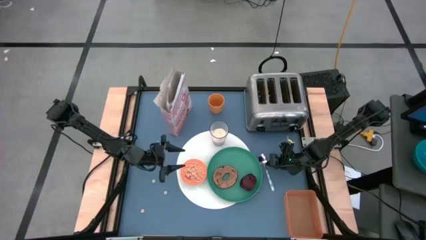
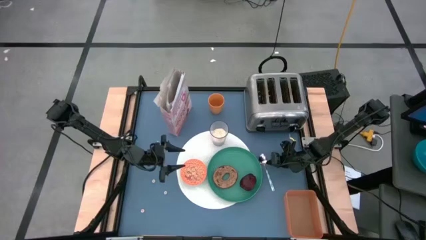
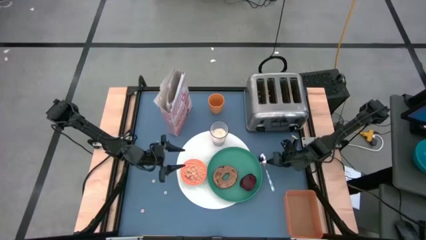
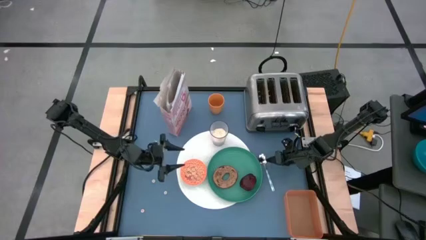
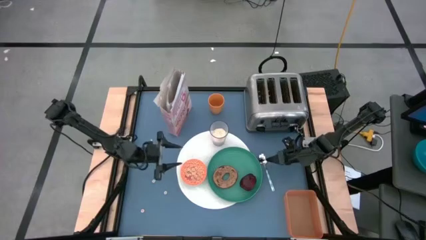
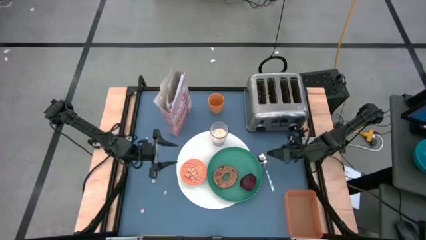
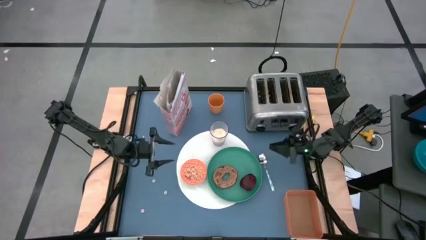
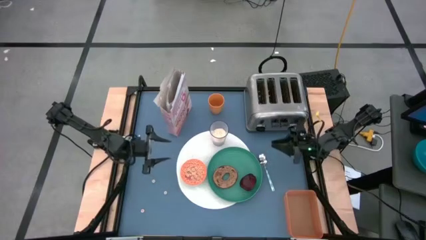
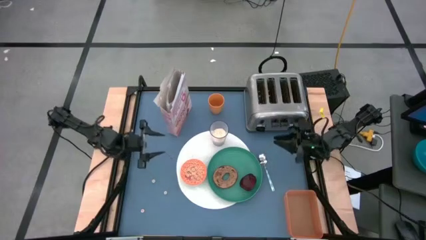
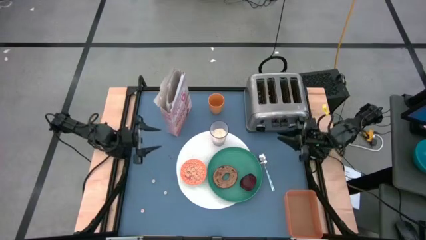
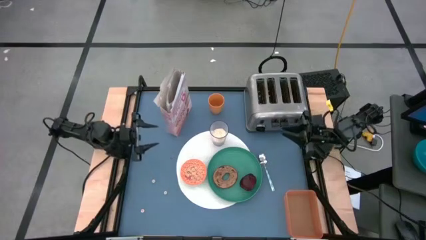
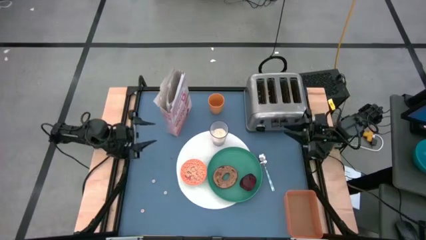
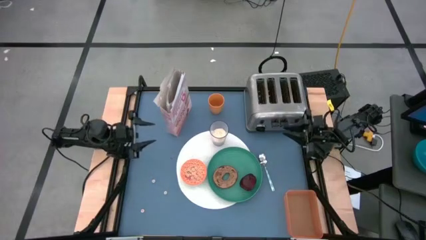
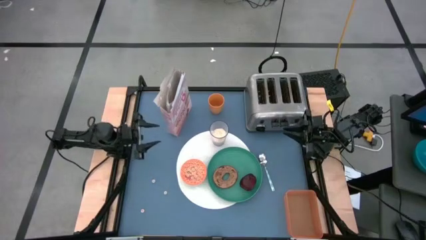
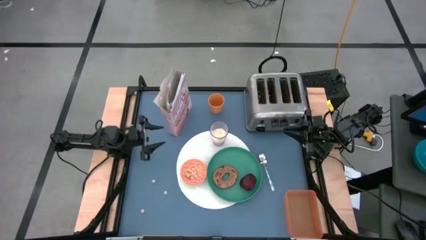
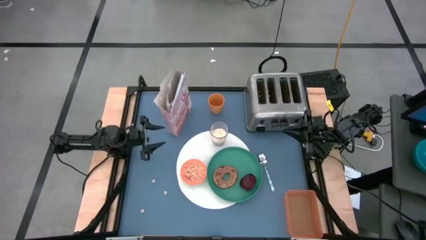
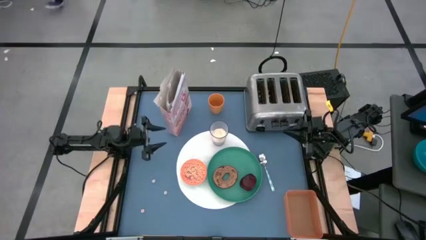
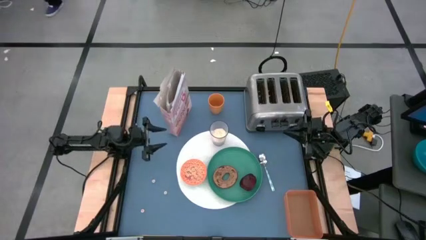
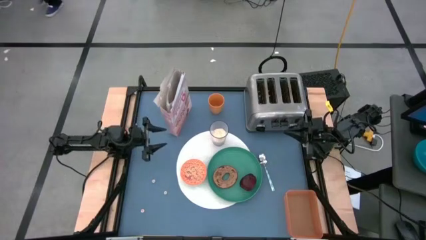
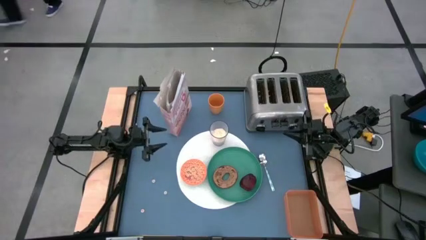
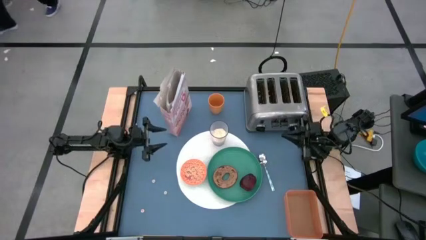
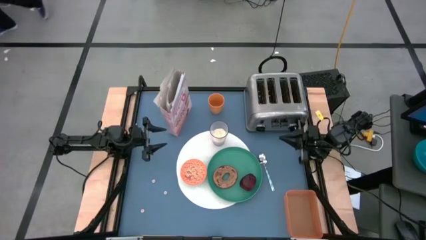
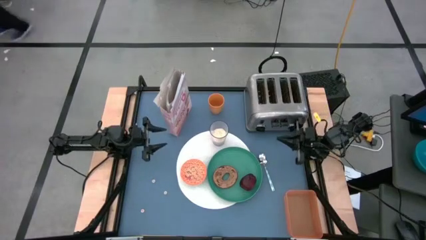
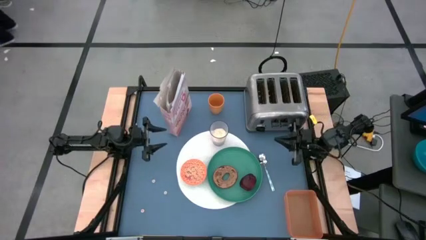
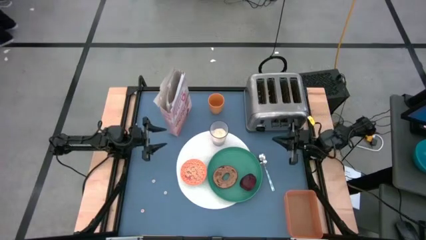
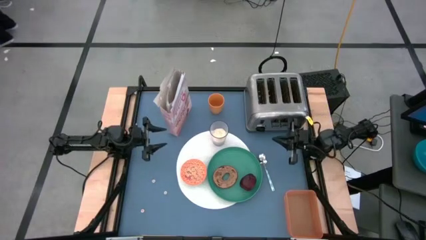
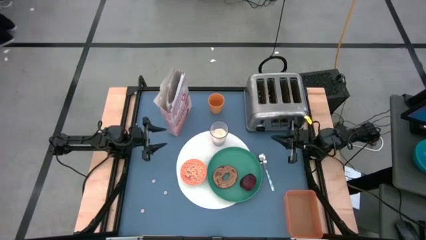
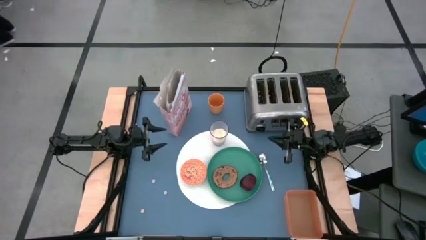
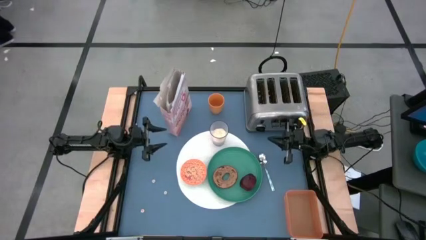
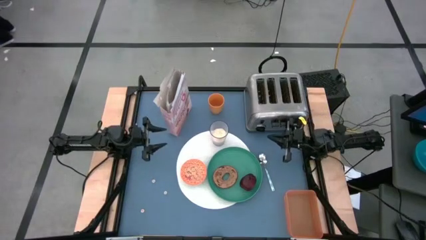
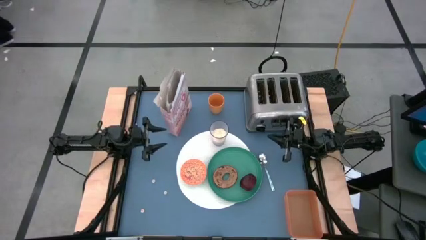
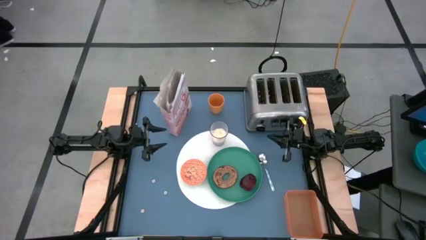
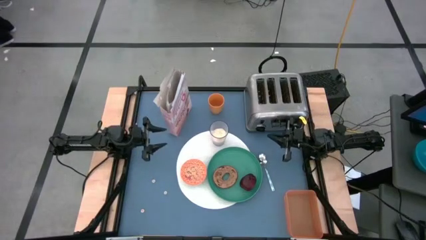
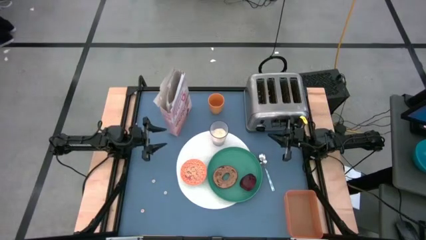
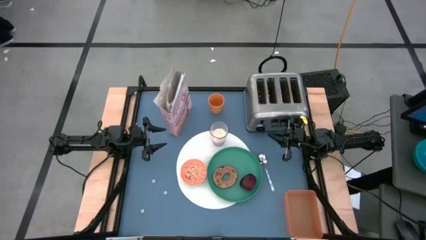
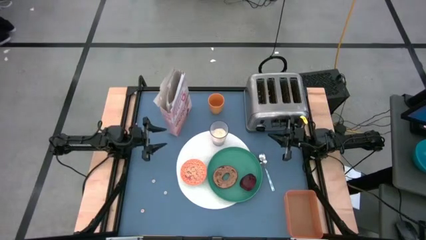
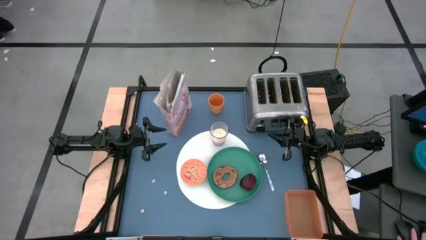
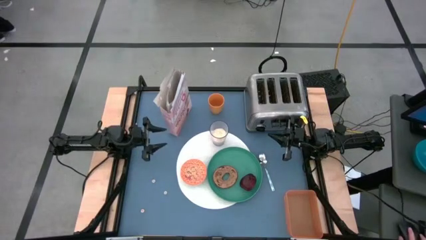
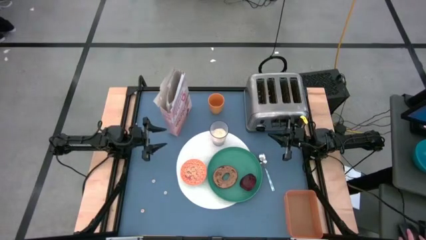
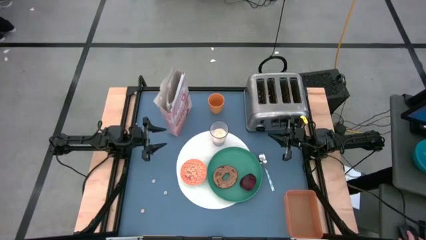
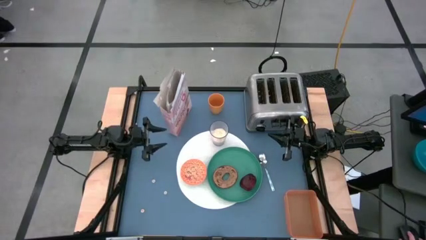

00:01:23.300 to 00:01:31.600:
Task: Arrange a breakfast setting
Return to Home Position

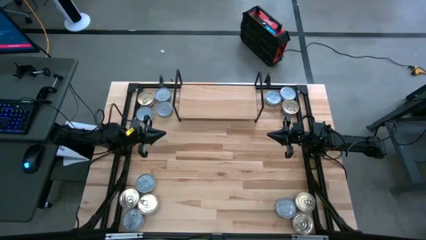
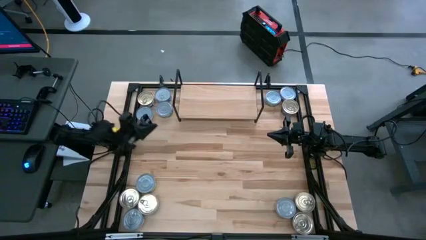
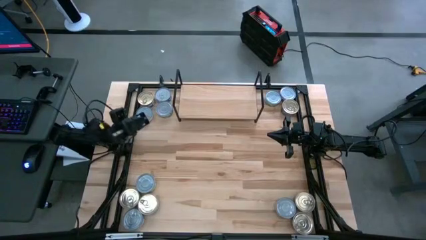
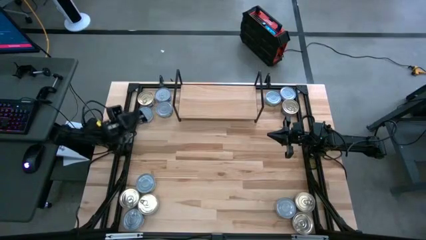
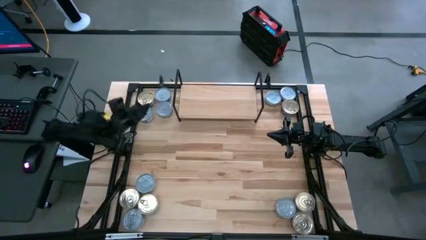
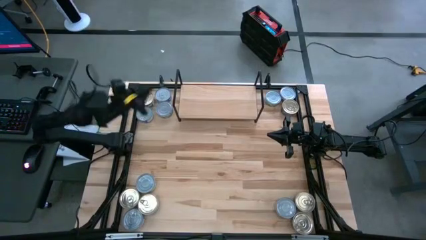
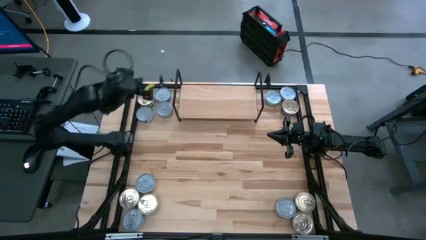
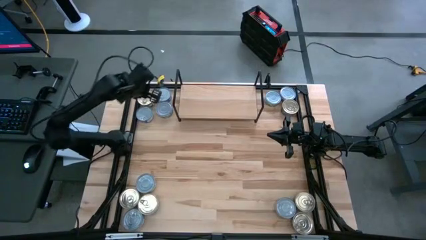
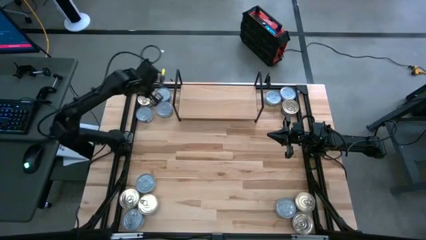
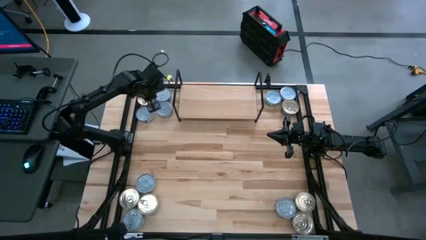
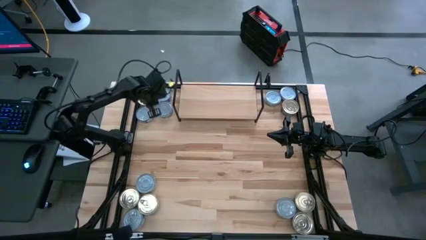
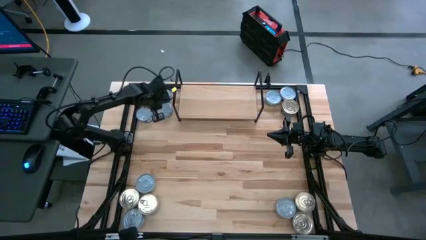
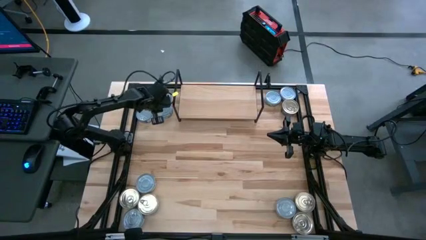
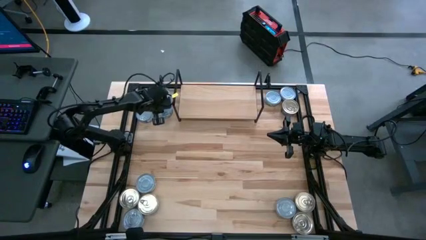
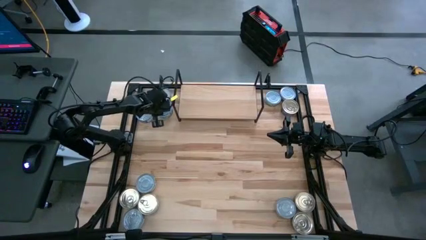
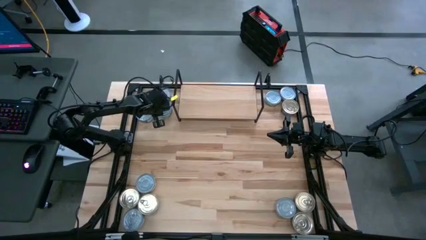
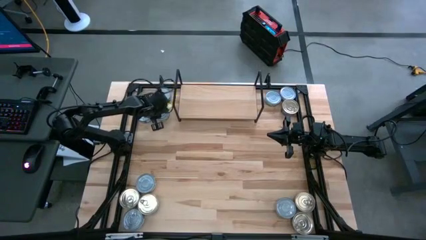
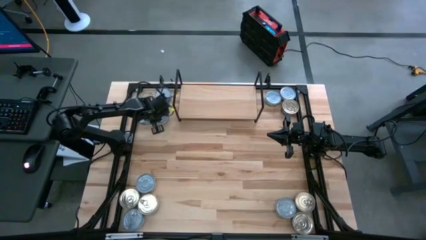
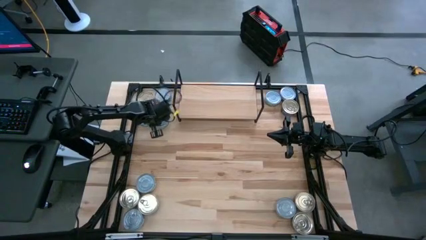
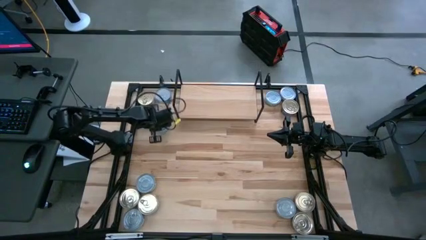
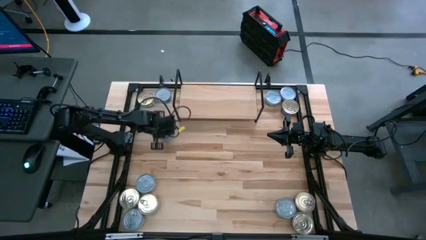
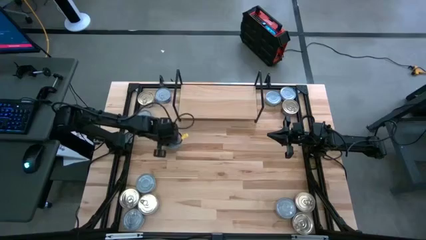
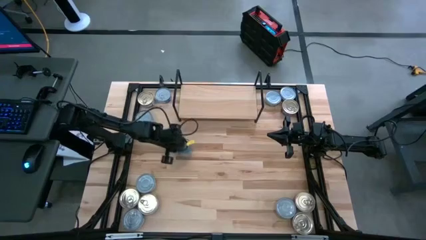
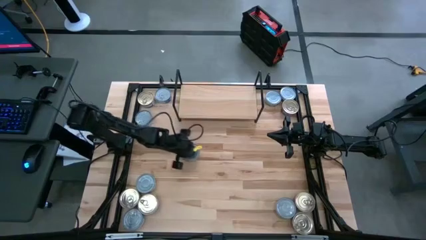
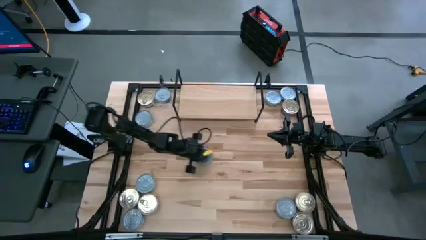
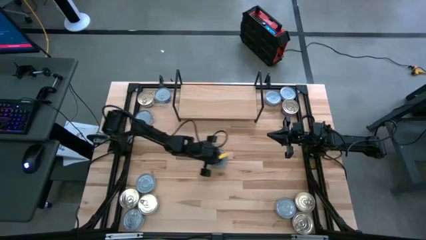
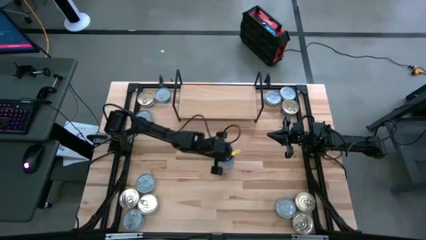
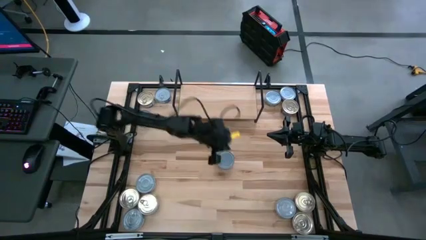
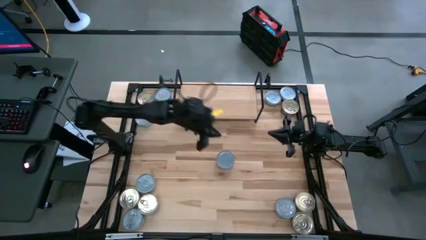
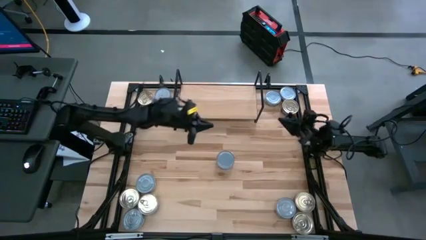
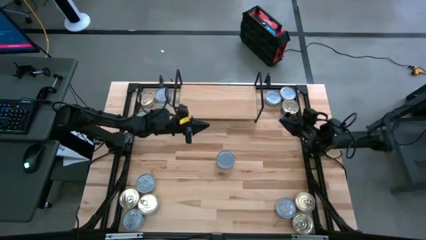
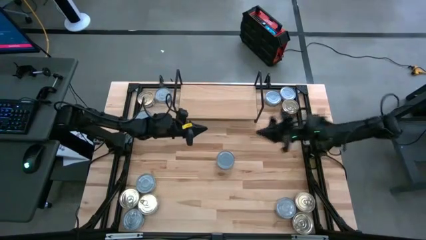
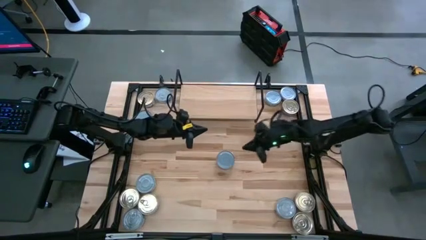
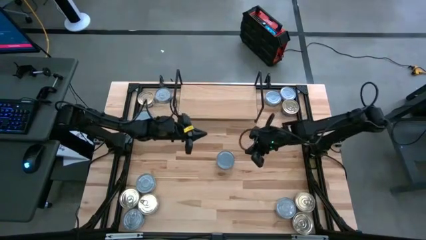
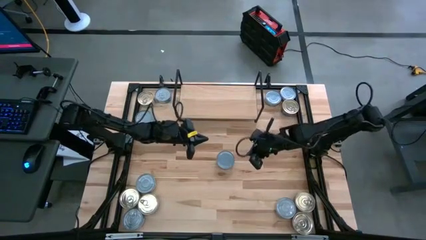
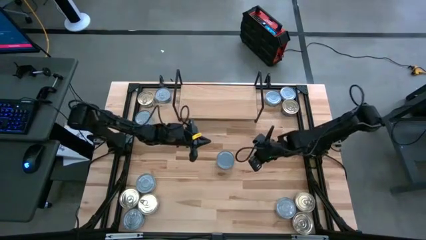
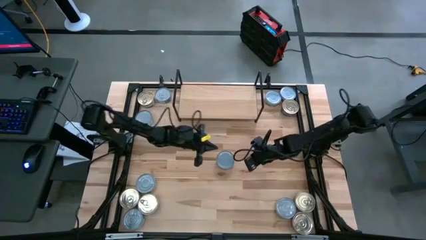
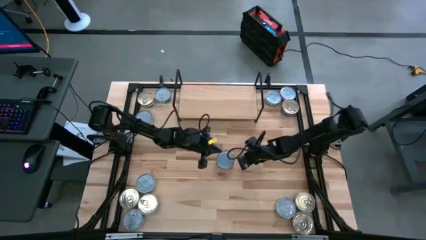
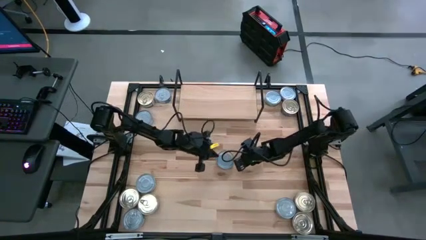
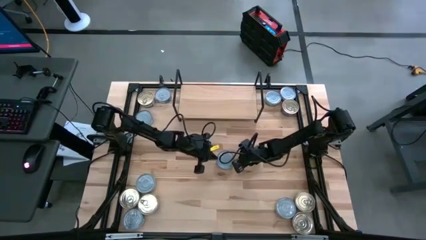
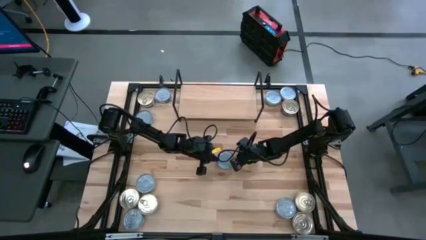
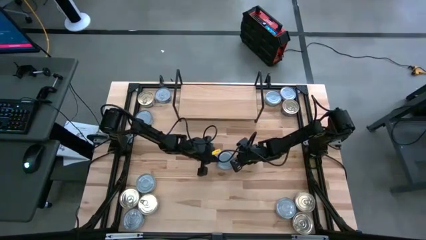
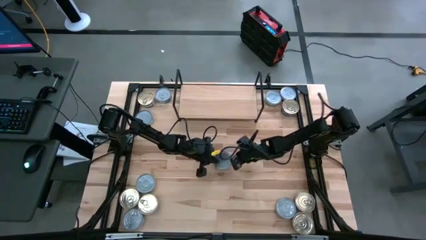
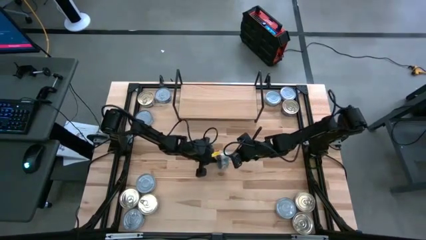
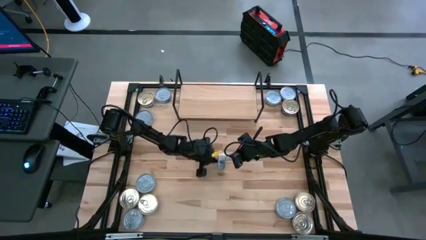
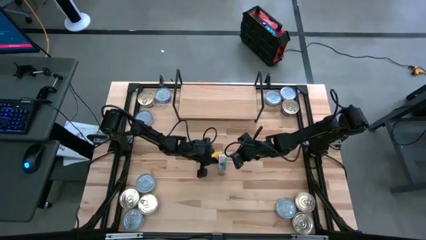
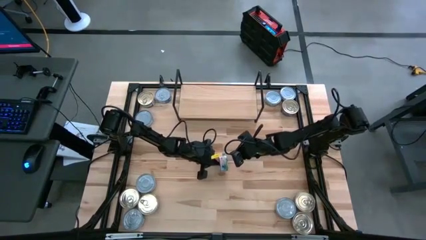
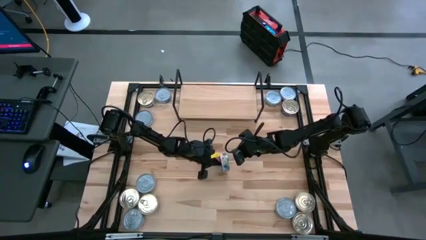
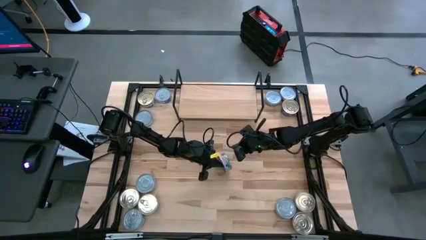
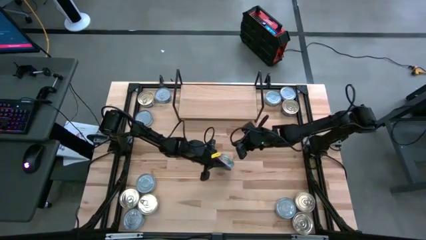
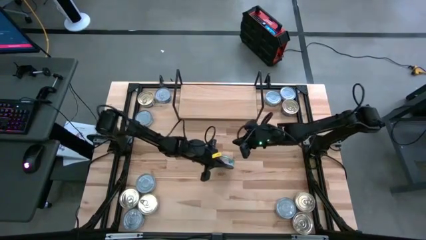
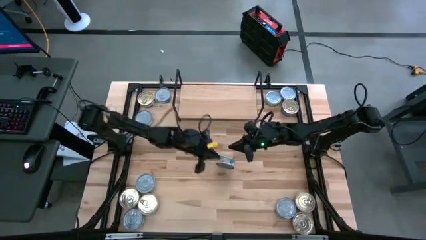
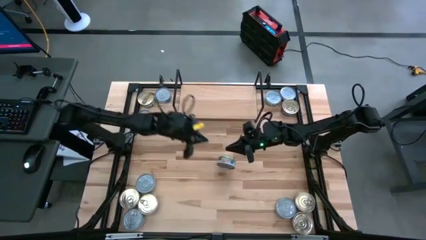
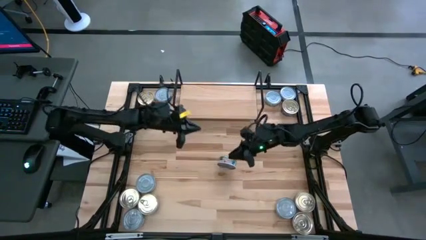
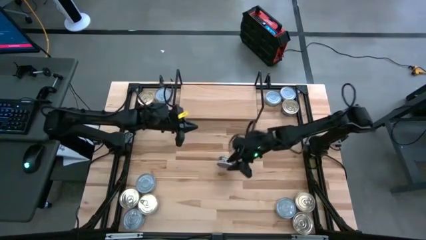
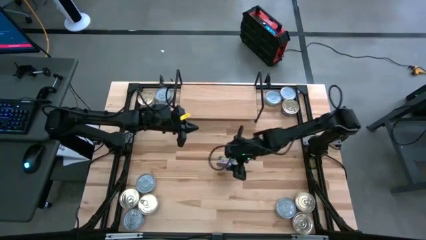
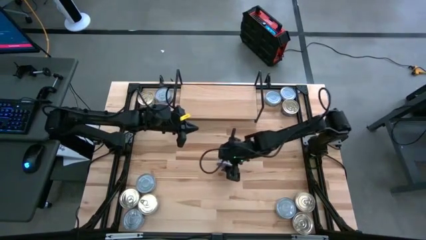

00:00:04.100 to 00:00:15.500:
Task: Stack canned seafood by type on shelf
Put the green tuna can on the shelf
